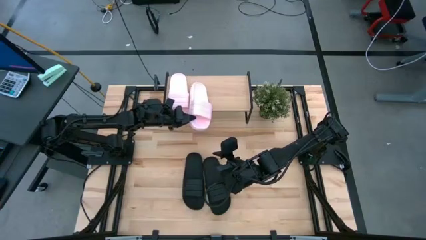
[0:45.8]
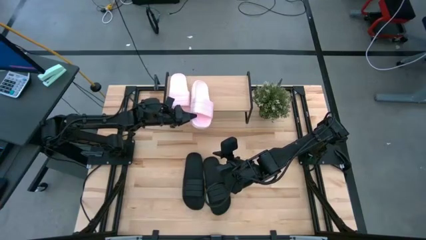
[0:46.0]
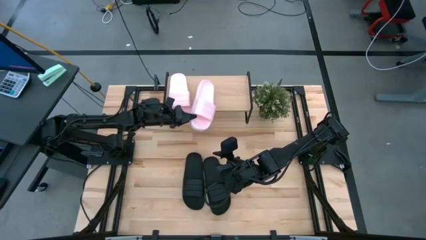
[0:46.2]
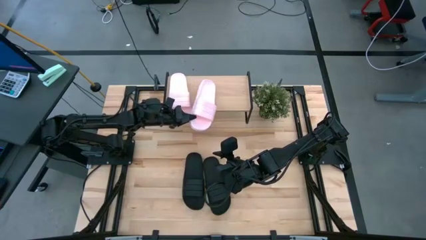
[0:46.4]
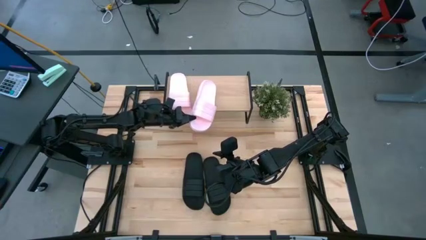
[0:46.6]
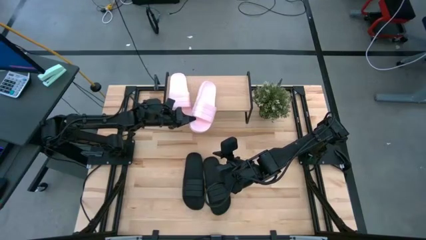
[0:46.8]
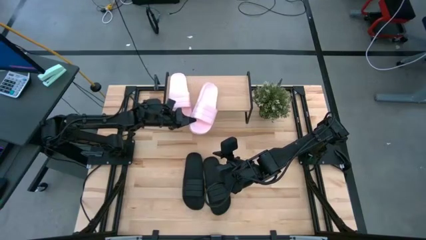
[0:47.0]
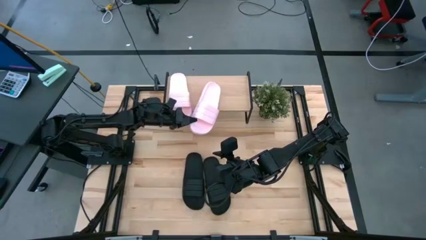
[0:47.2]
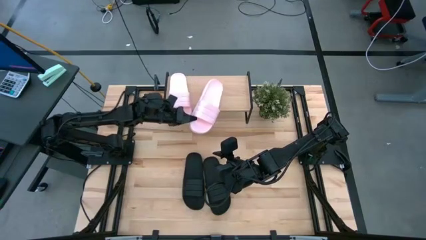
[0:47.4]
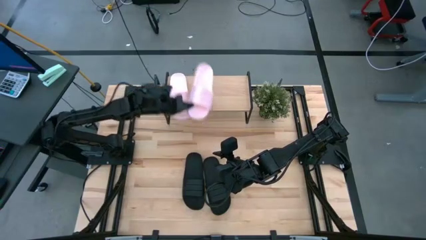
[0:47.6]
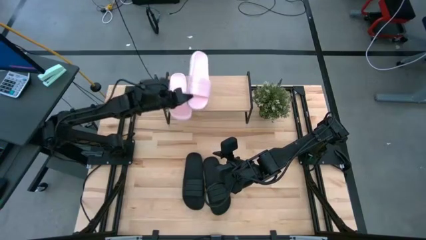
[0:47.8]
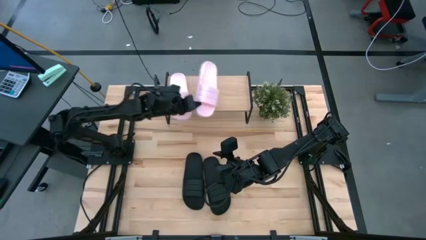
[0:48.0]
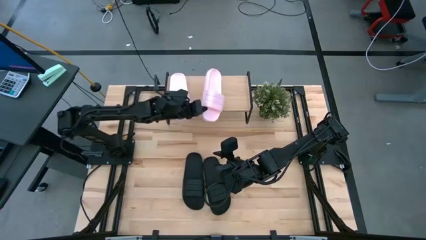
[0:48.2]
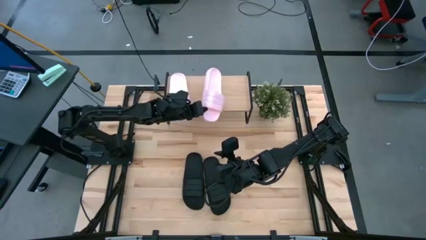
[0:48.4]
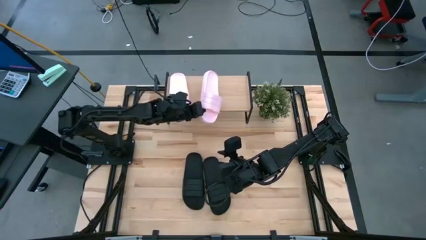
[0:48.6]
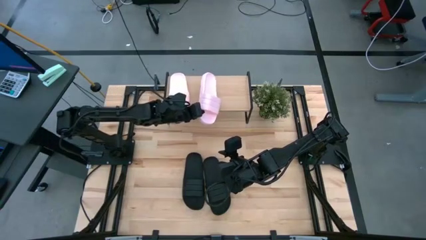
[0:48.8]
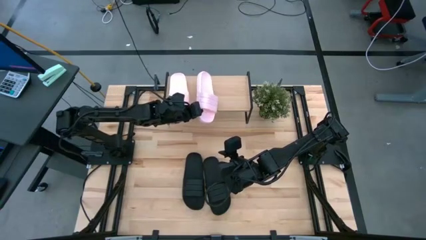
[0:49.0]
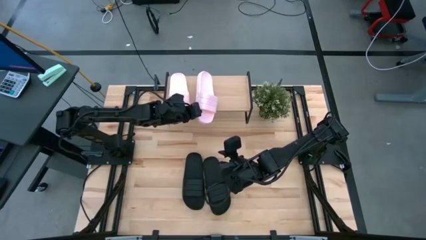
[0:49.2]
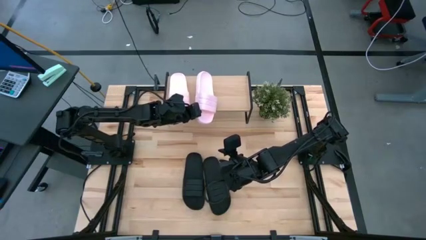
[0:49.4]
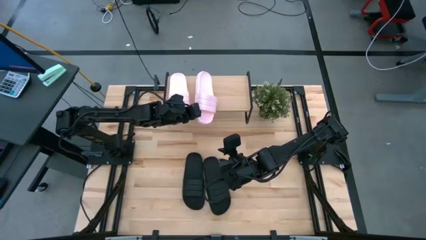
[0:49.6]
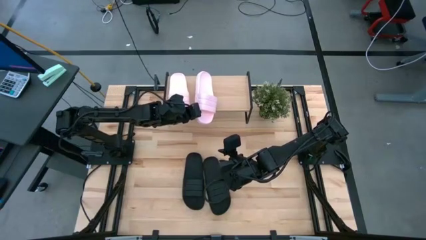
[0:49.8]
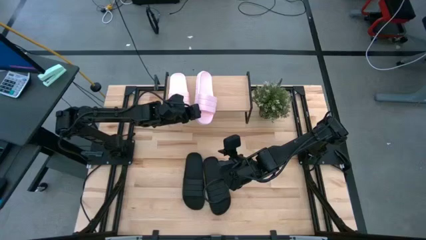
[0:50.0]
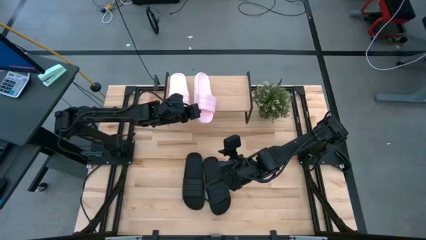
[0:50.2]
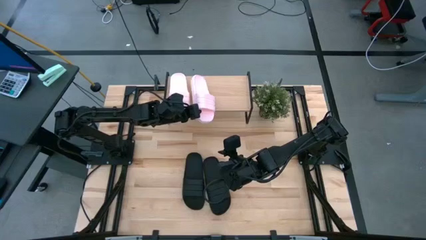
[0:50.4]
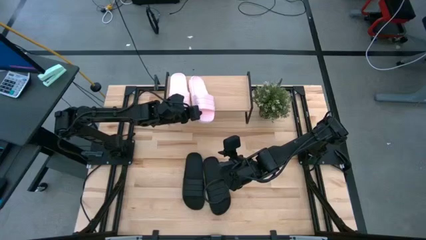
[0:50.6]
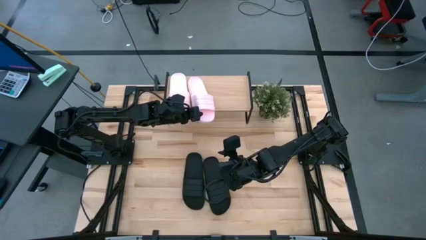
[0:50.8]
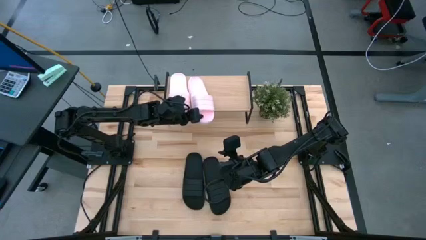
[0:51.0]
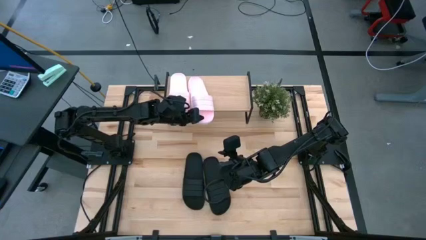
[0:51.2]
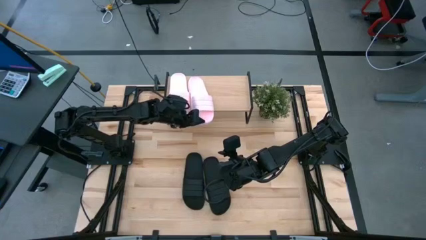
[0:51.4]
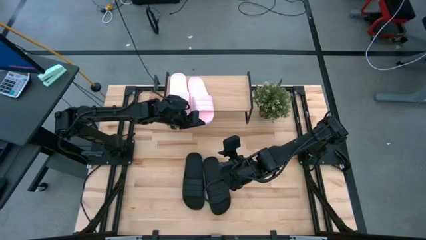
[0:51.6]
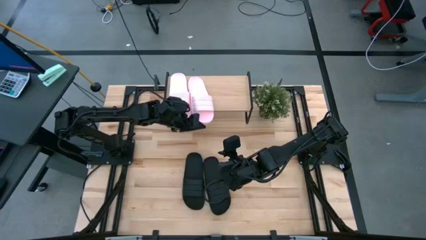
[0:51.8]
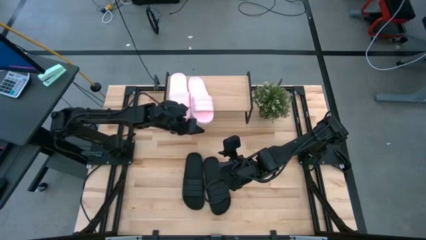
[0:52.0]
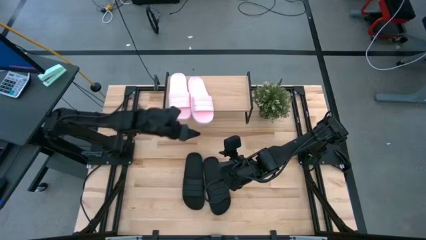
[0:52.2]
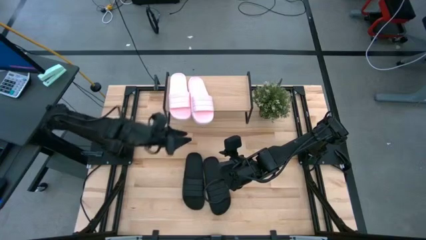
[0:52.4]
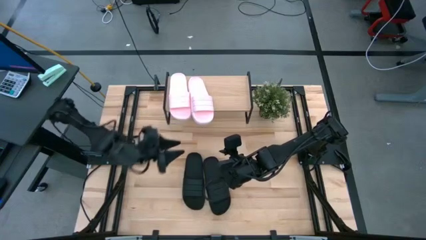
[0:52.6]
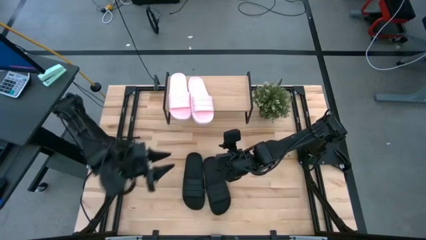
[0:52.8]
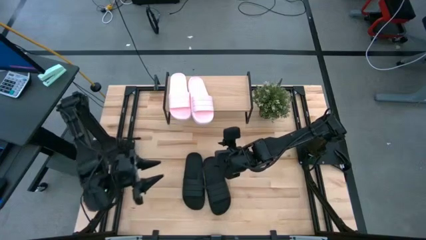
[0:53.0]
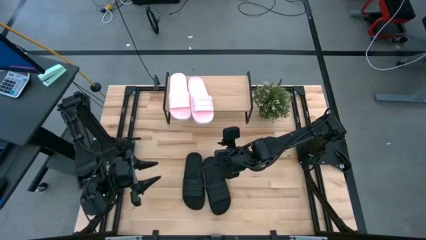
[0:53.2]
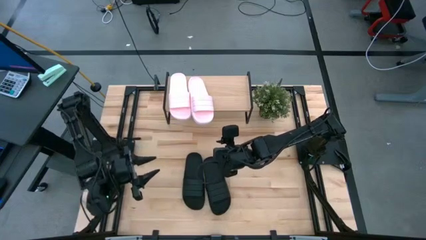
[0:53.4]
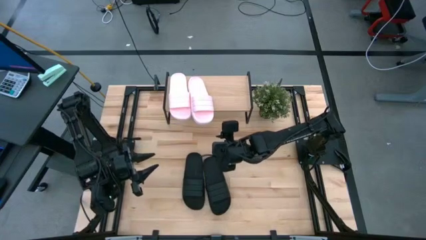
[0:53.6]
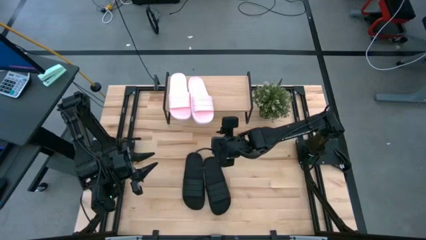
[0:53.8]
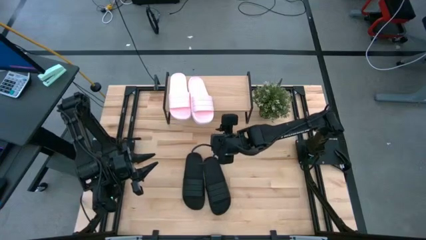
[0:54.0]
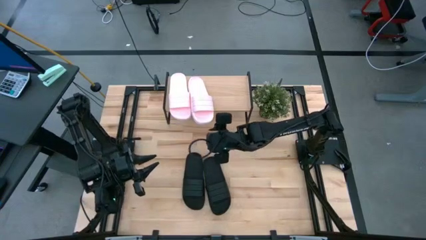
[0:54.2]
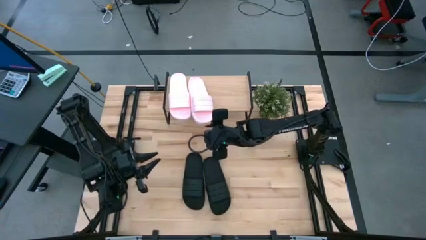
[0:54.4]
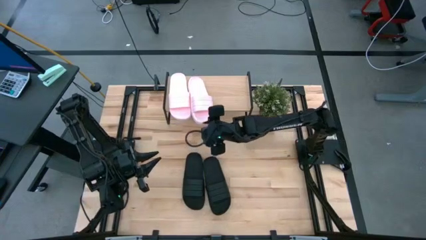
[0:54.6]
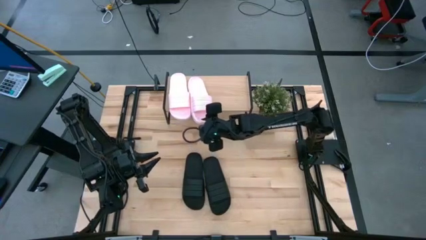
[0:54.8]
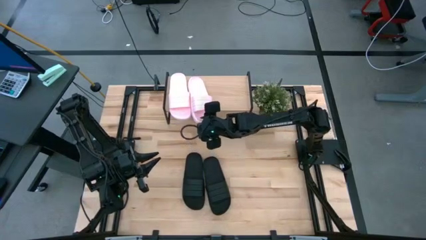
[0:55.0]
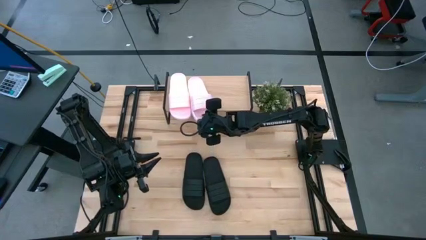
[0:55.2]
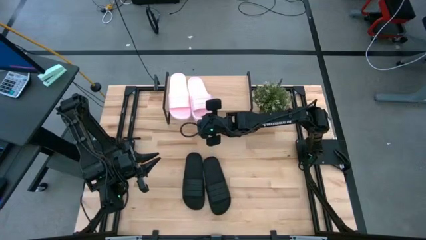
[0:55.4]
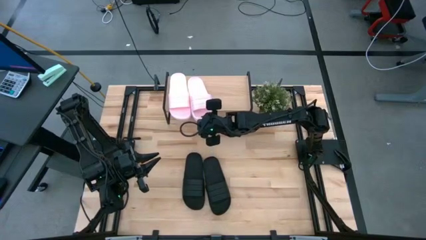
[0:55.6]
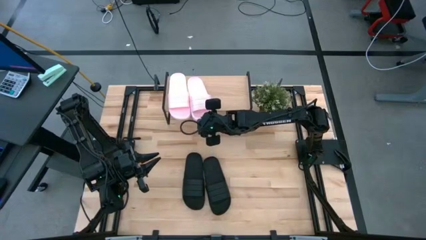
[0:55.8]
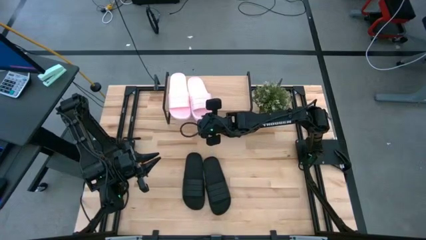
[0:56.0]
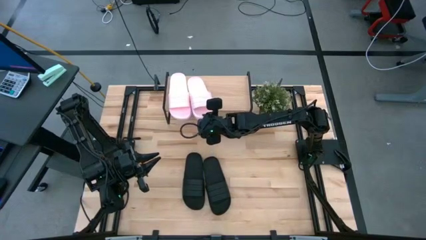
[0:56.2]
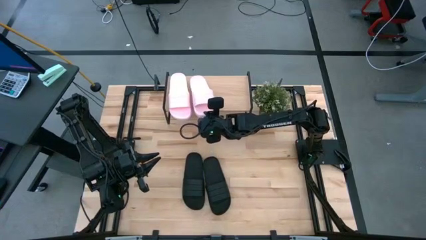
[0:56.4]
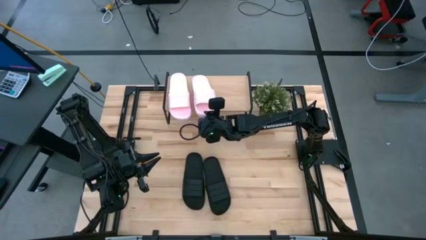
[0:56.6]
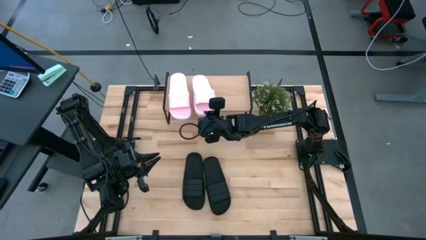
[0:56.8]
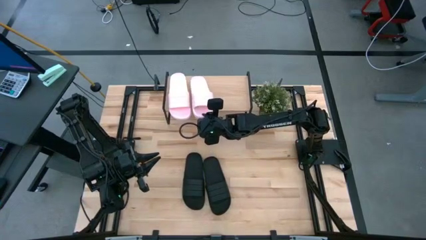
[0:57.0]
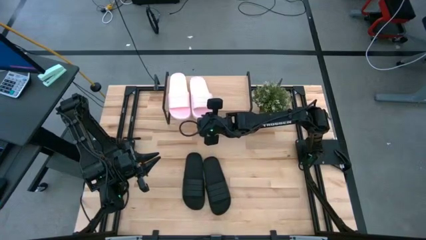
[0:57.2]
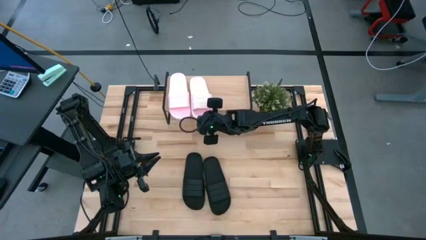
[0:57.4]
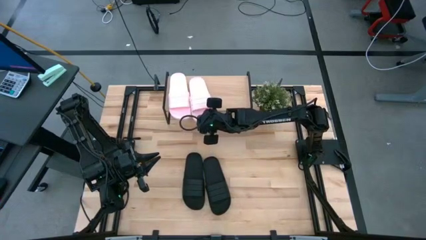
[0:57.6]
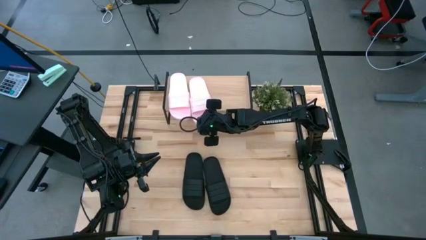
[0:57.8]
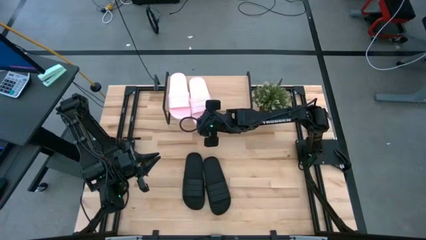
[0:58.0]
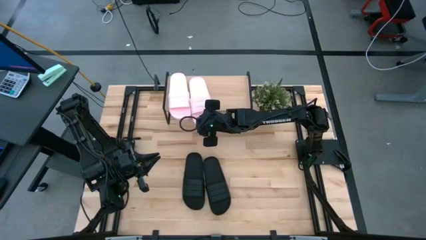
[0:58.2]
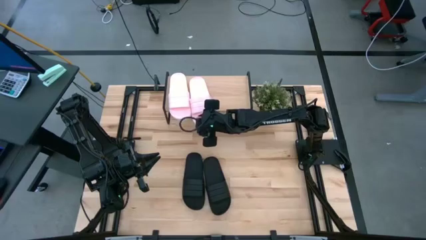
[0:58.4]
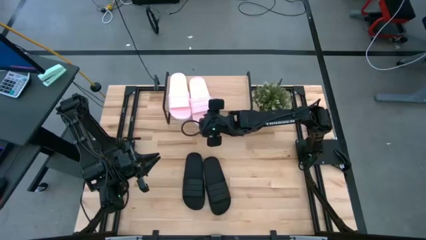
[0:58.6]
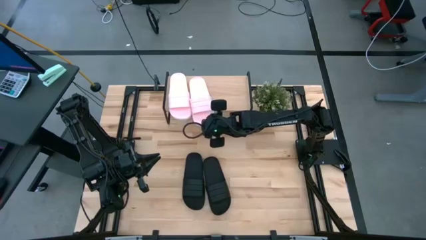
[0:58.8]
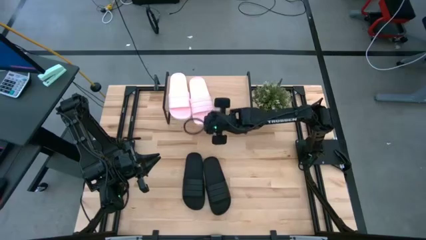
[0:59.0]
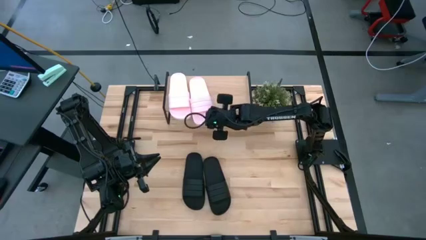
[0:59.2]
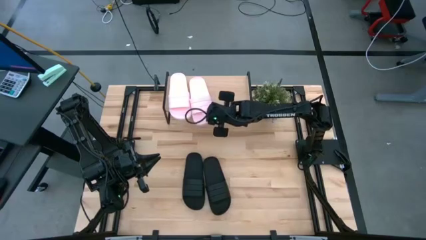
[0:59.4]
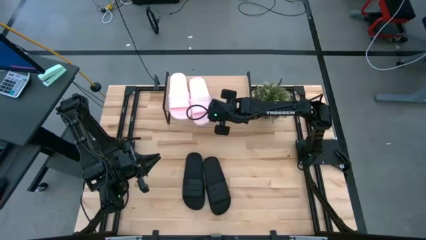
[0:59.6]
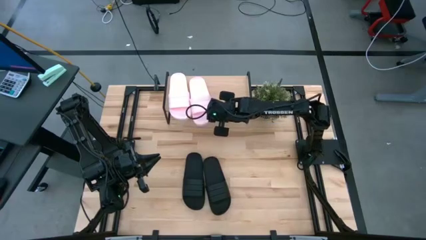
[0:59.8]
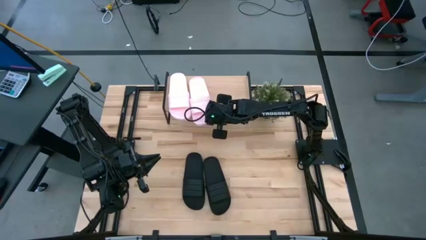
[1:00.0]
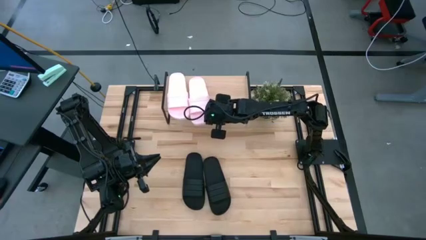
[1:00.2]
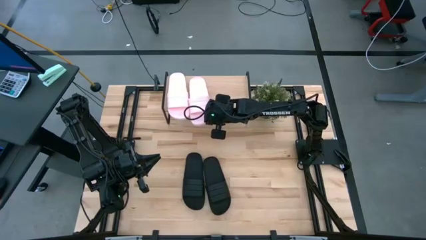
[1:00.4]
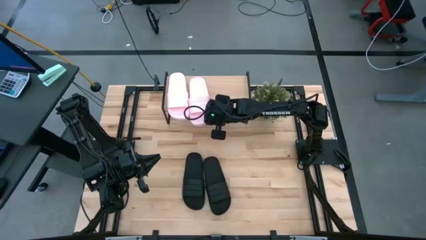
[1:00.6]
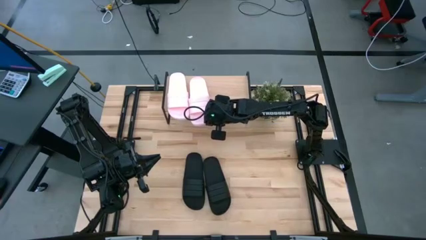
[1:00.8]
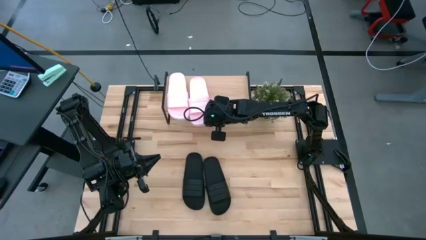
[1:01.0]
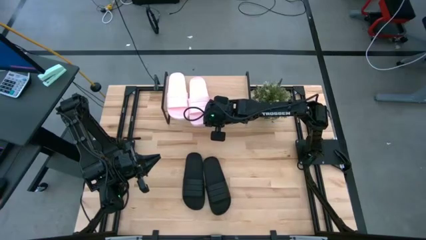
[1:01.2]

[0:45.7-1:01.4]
Task: Pick and place slides into the shelf
Put the pink slide on the shelf
